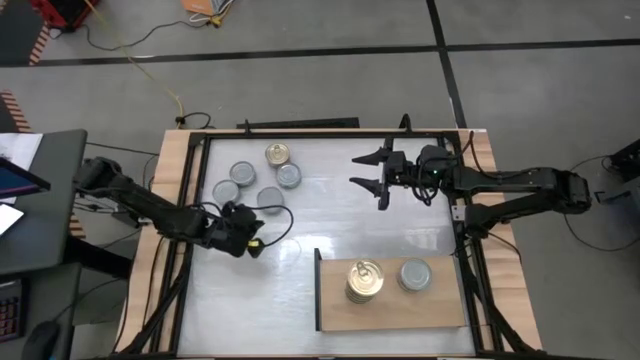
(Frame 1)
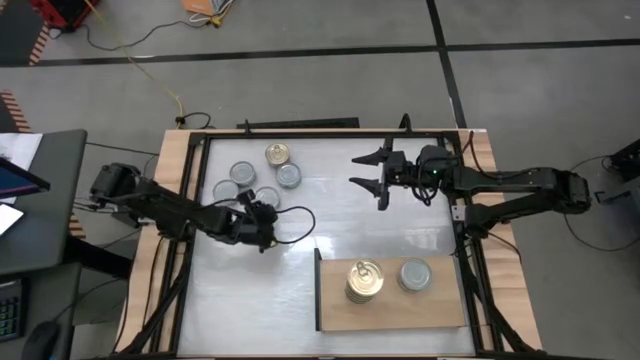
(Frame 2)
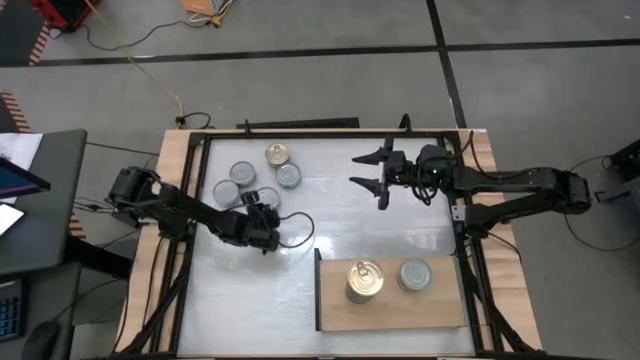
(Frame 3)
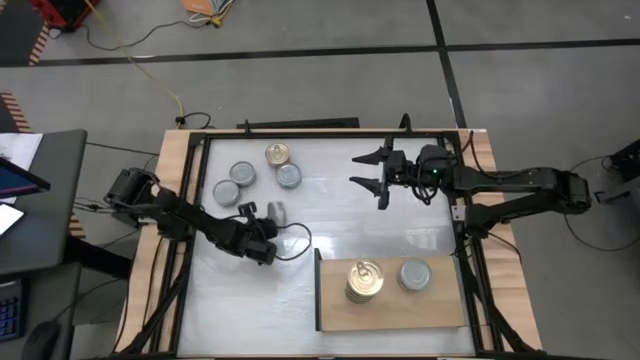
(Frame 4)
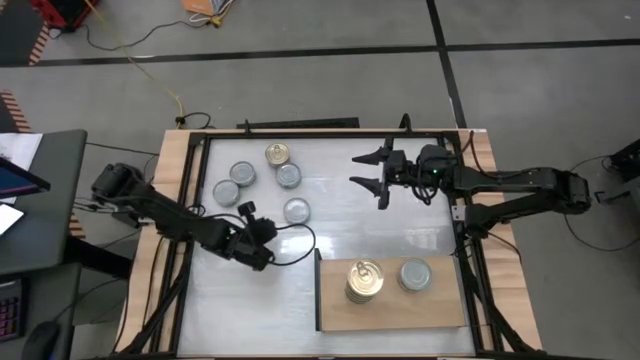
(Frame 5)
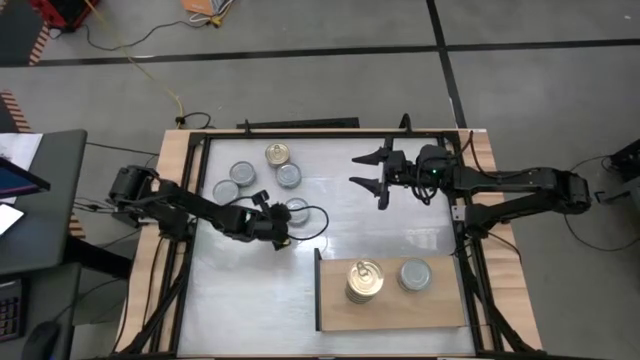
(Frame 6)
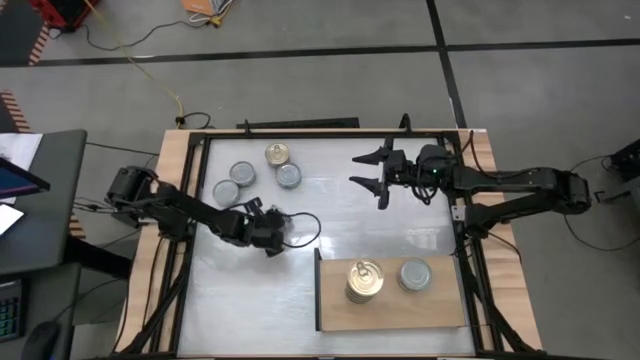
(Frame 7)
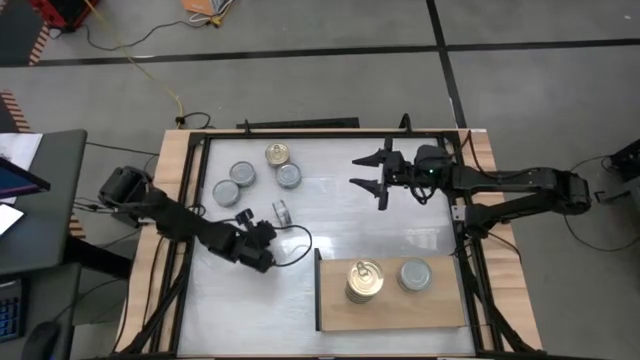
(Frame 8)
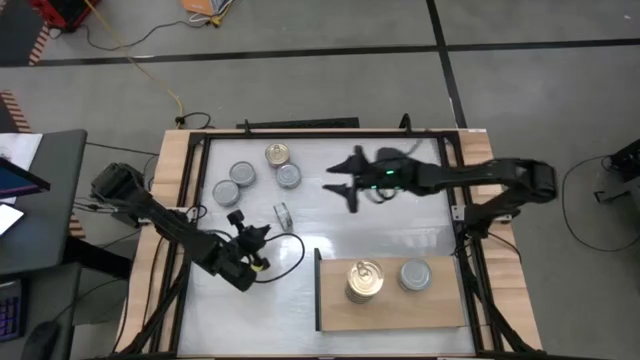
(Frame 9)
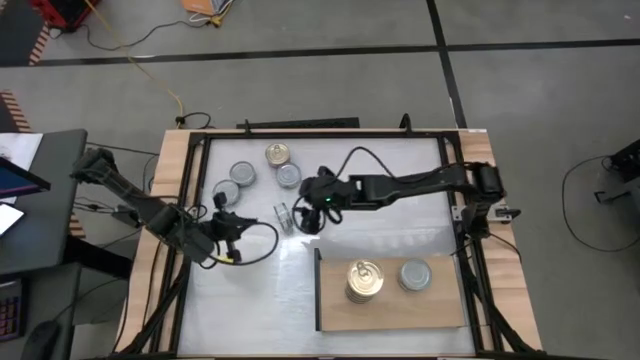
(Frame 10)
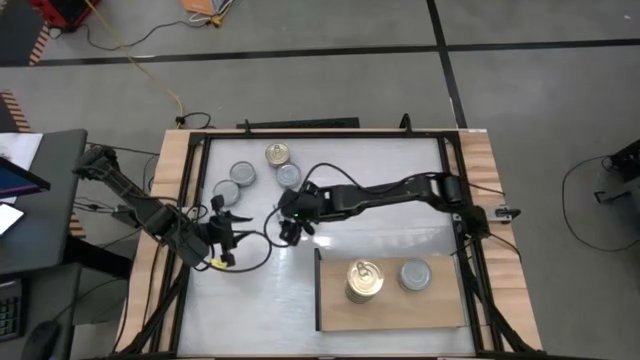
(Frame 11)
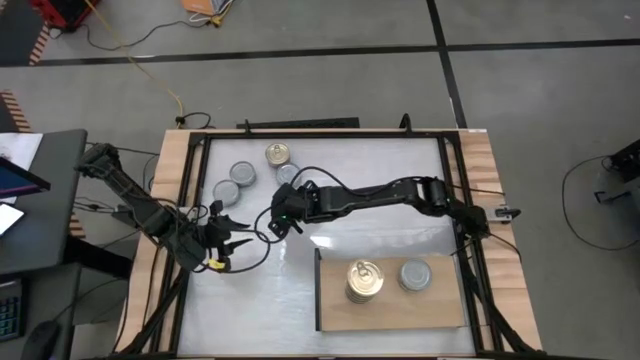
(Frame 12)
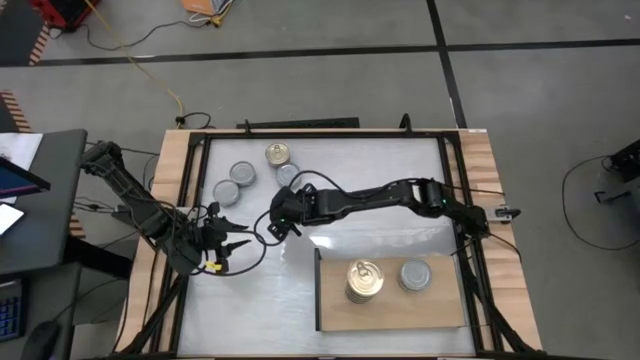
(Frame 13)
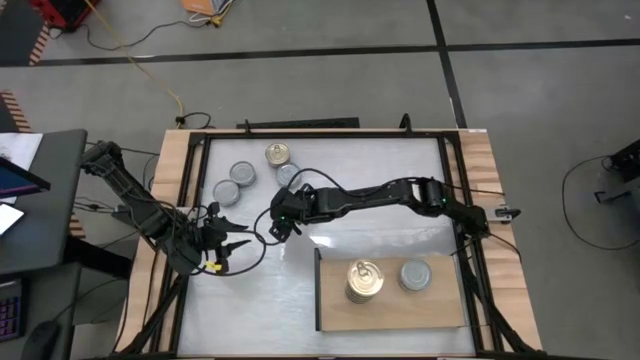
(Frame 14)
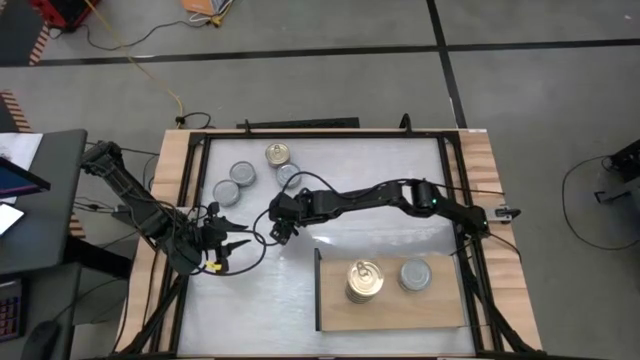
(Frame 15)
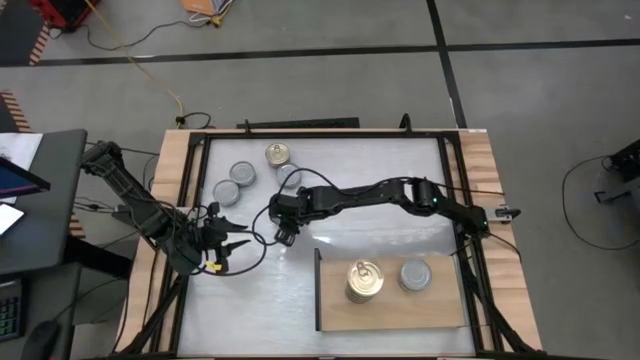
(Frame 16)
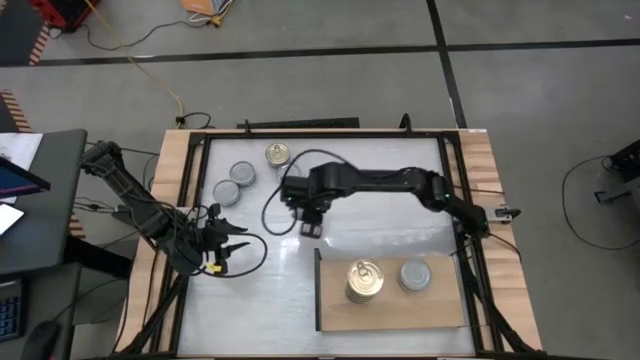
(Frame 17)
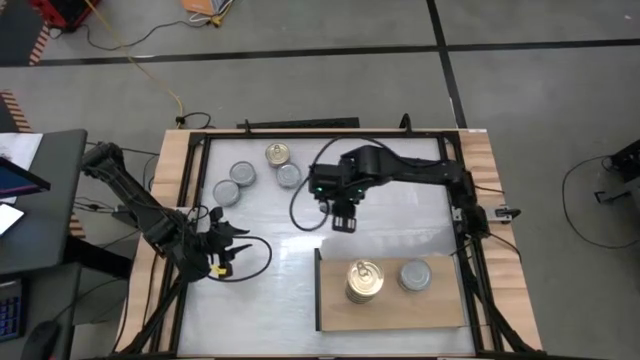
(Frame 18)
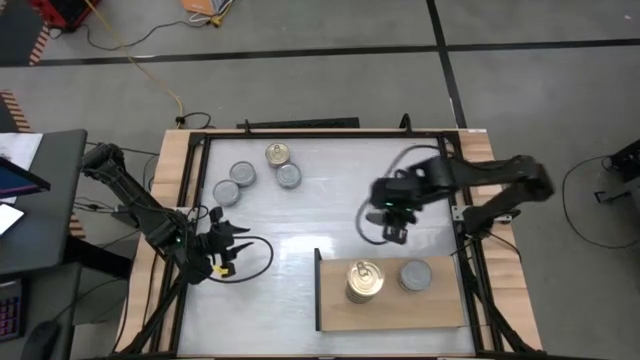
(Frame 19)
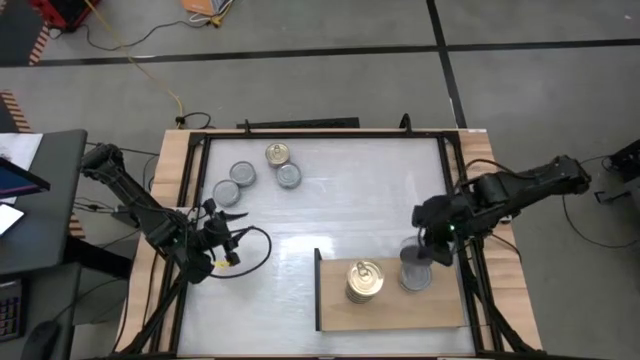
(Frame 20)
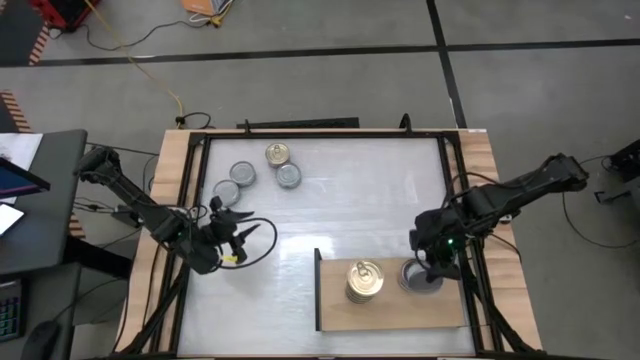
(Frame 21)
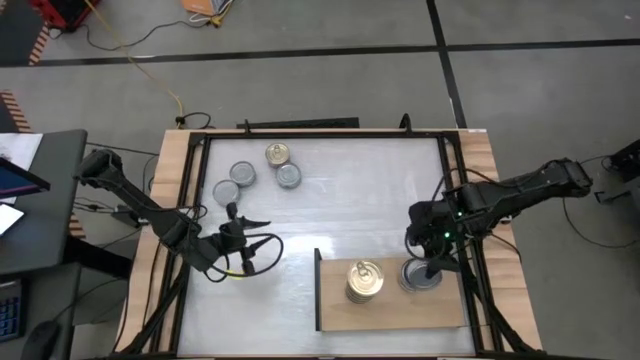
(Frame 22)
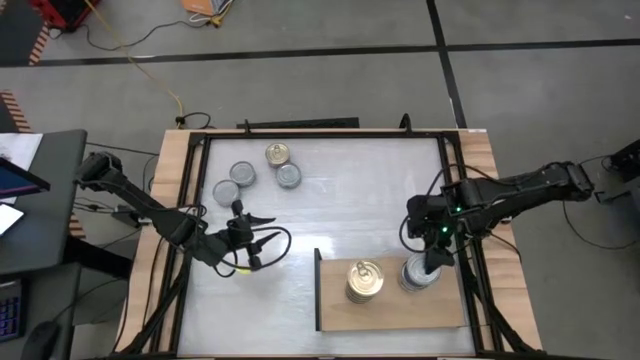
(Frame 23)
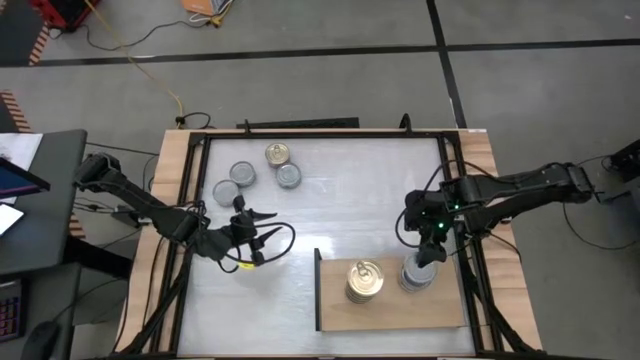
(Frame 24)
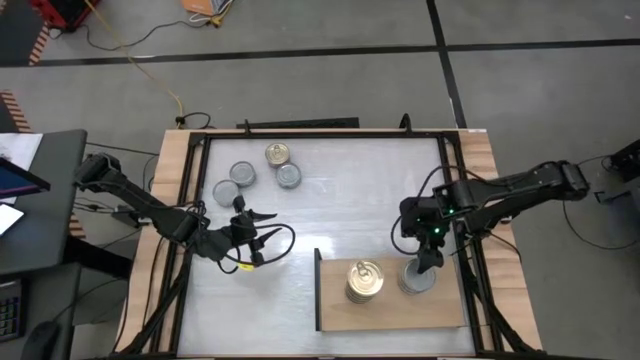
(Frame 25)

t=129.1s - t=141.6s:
Task: Stack canned seafood by type on shelf
Stack the green tuna can on top of the green tuna can on the shelf

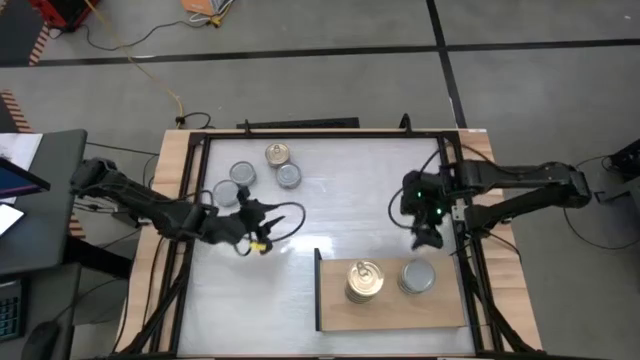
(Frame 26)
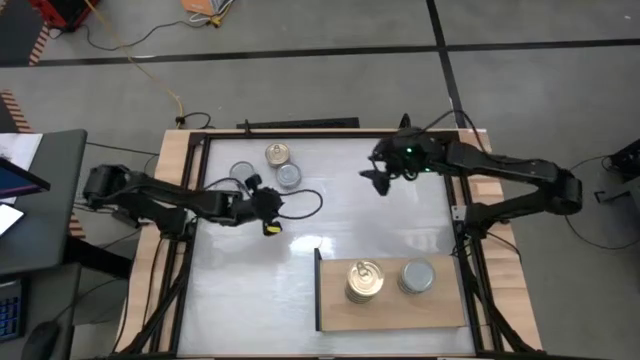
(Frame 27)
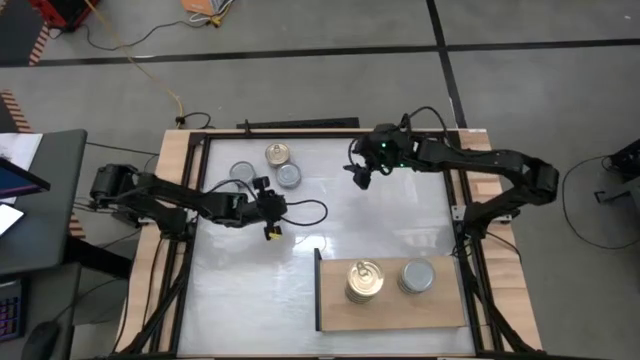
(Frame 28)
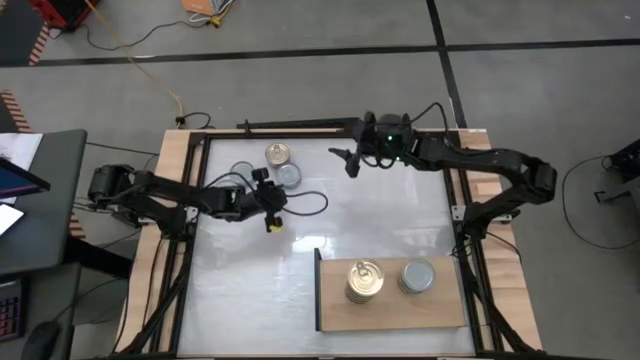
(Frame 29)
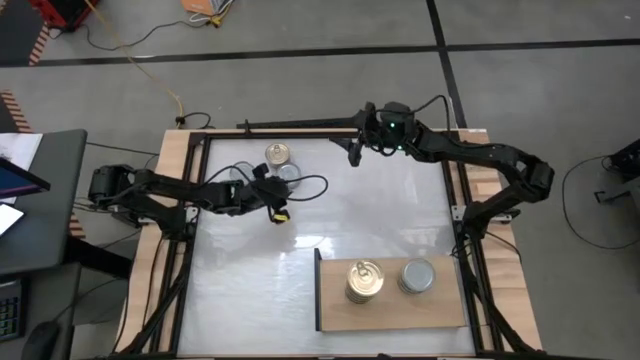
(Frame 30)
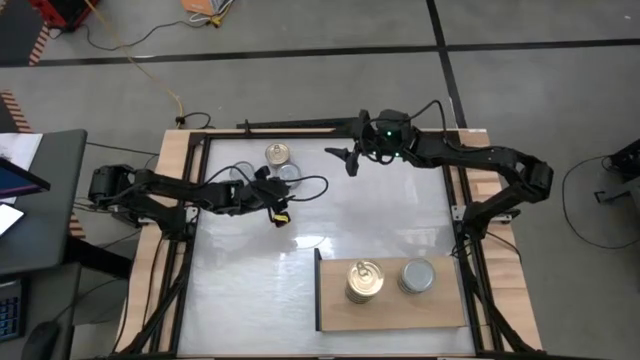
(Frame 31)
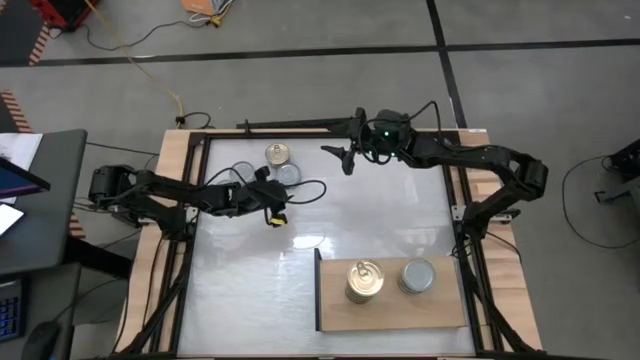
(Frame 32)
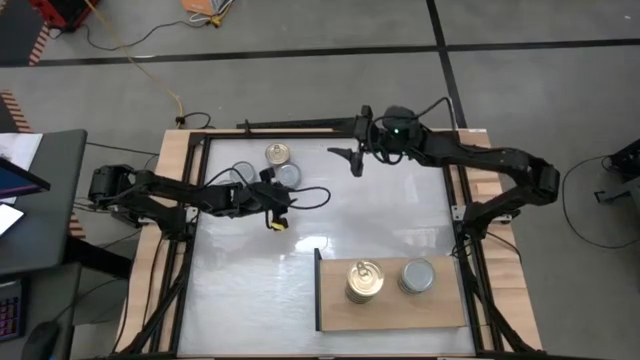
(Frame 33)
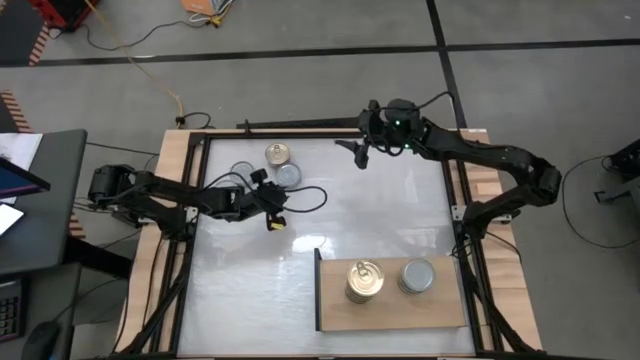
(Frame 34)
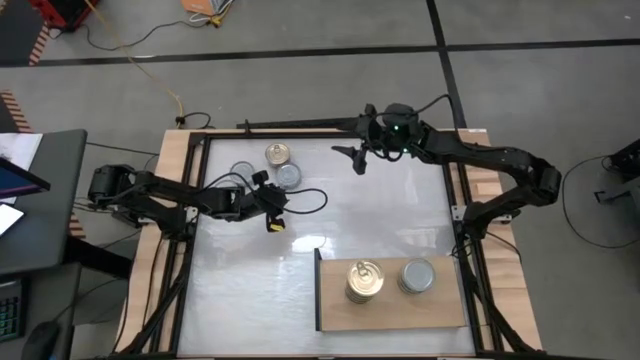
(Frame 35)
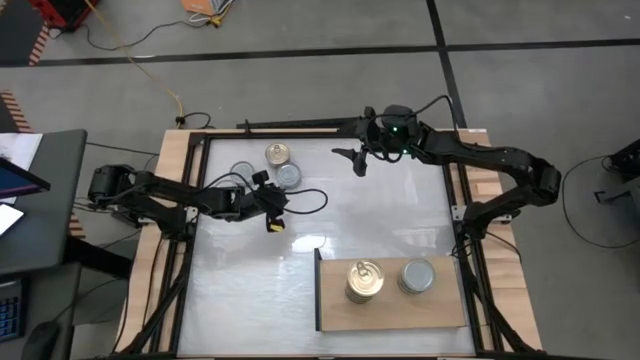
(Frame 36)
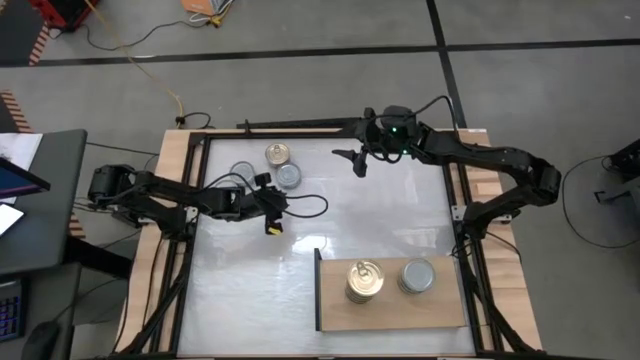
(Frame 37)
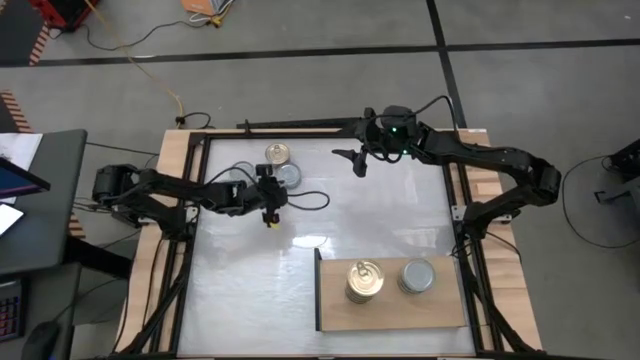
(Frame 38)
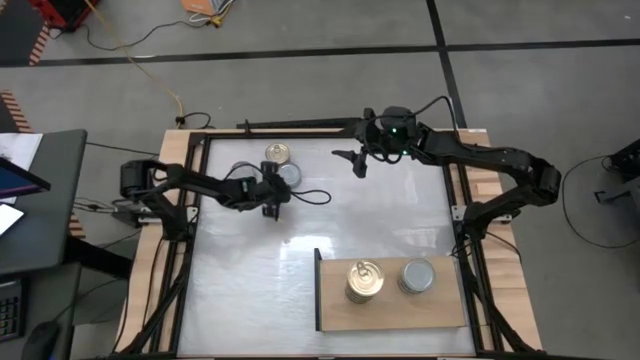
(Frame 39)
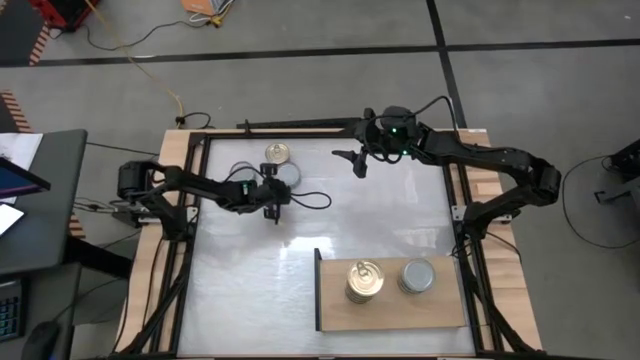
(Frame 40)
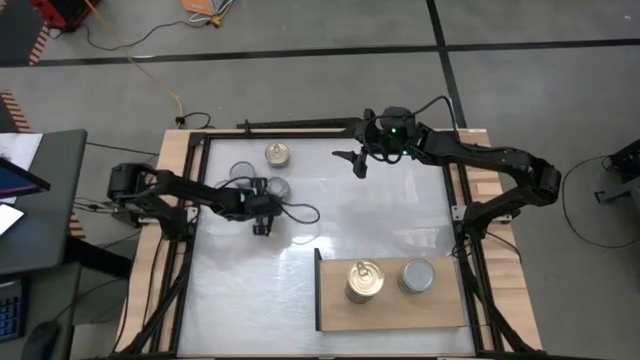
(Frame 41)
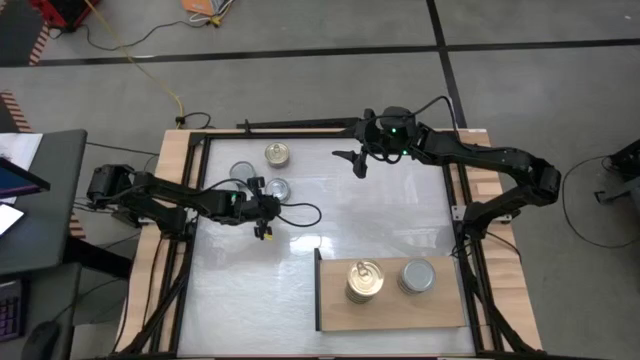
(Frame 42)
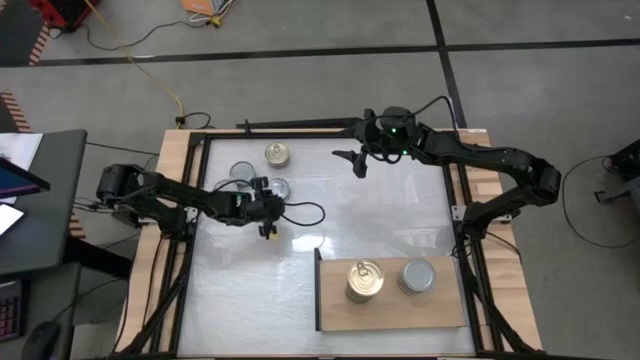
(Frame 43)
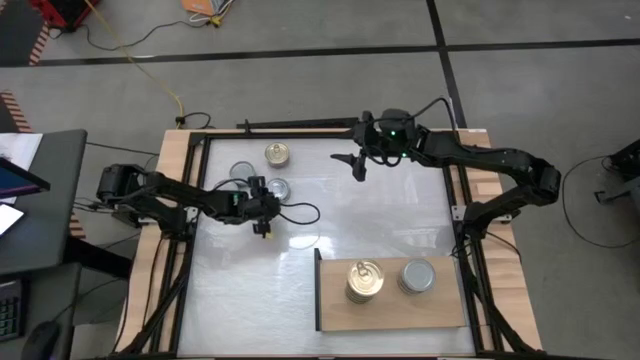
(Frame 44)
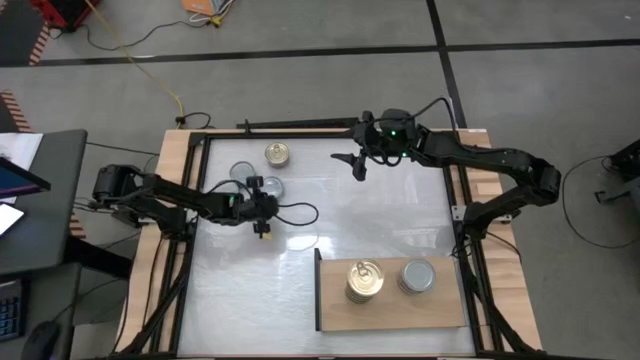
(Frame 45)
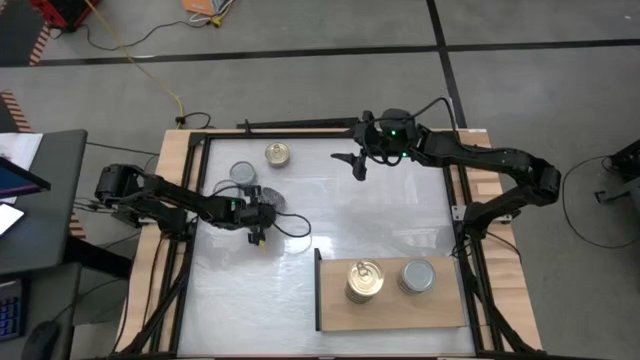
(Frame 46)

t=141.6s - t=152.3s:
Stack the green tuna can on top of the green tuna can on the shelf
